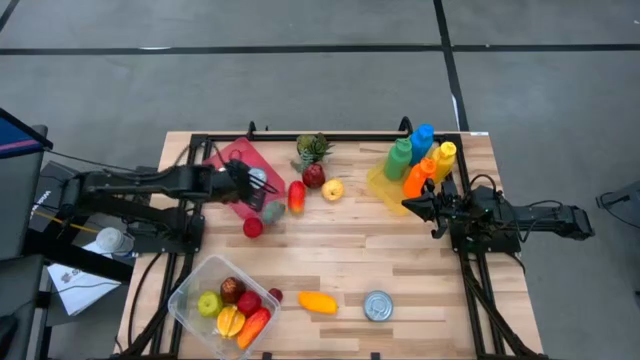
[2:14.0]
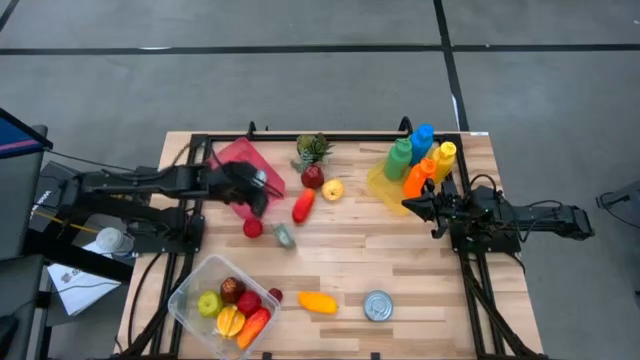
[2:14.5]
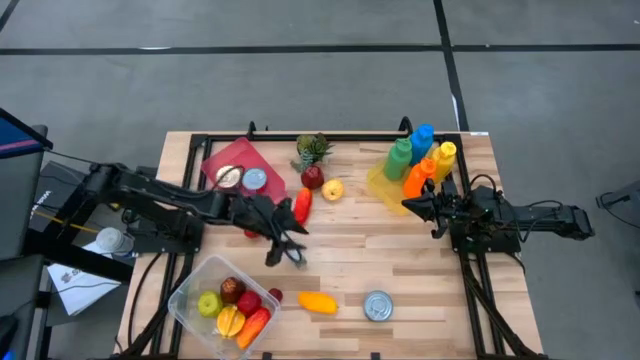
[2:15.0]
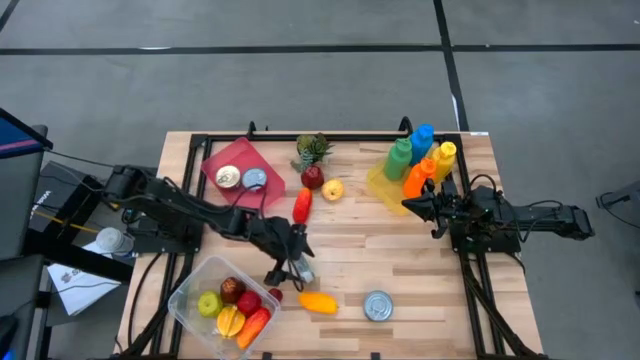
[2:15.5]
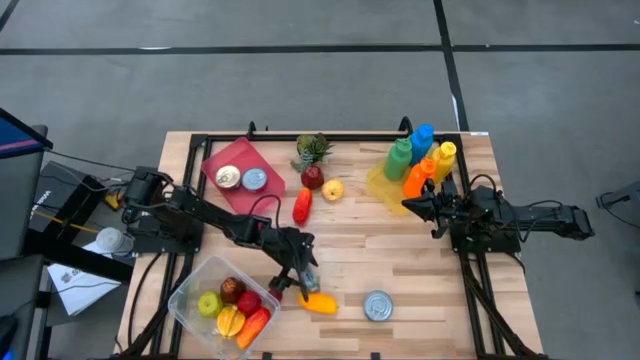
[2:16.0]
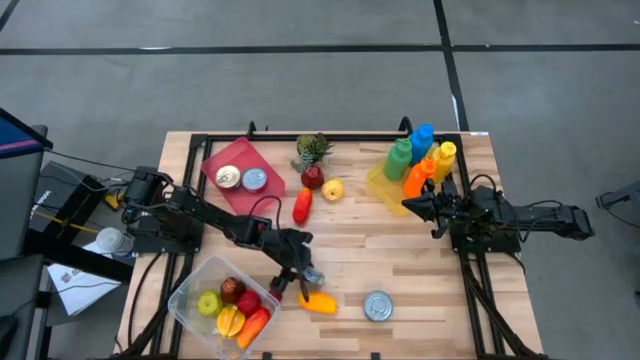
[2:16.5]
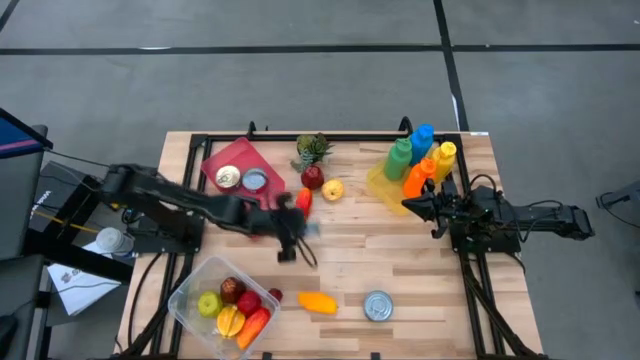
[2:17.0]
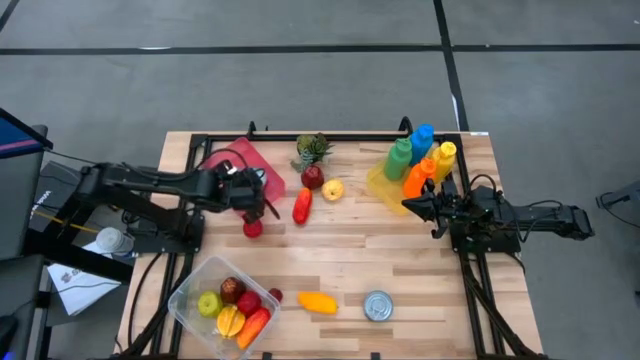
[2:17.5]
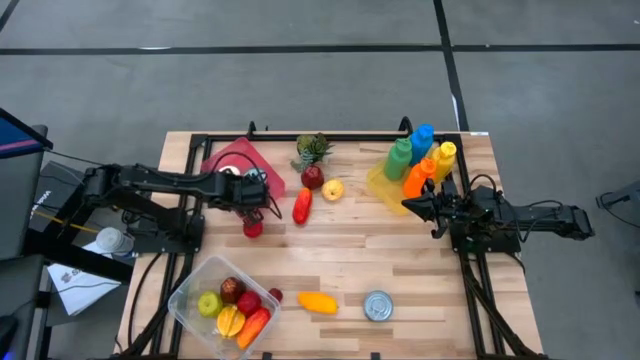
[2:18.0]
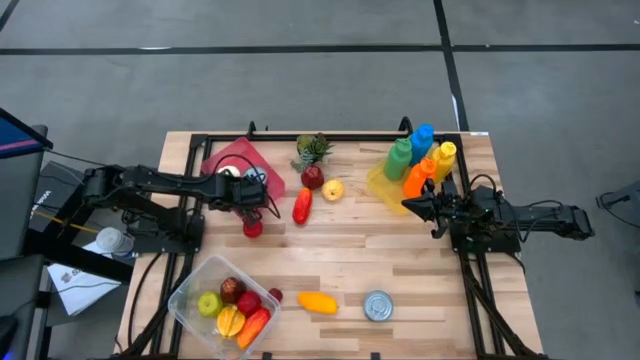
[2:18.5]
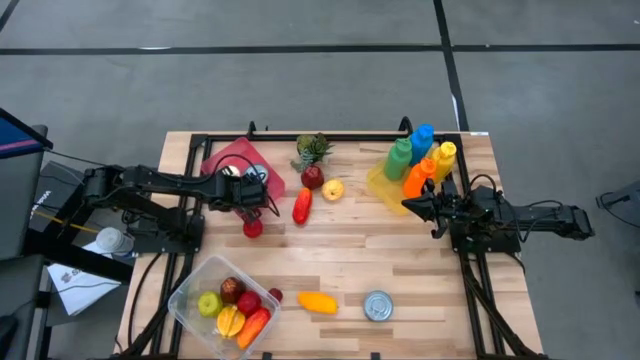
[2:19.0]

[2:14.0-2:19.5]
Task: Pick & Place Food Item
Put the green tuna can into the pink bin

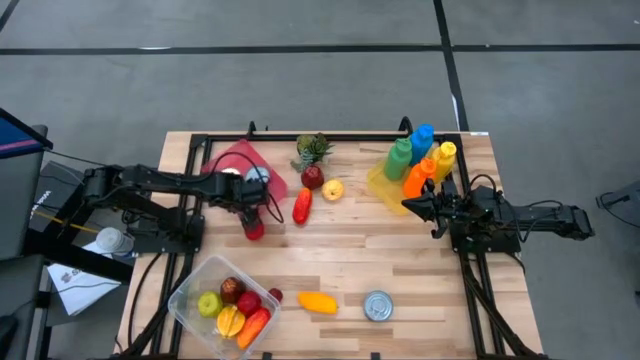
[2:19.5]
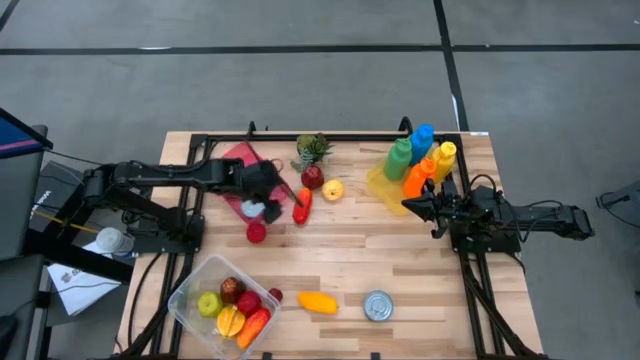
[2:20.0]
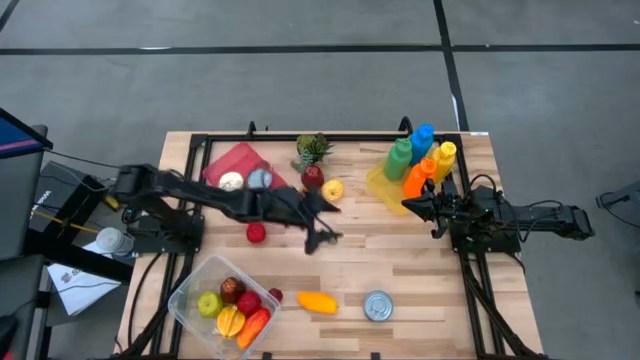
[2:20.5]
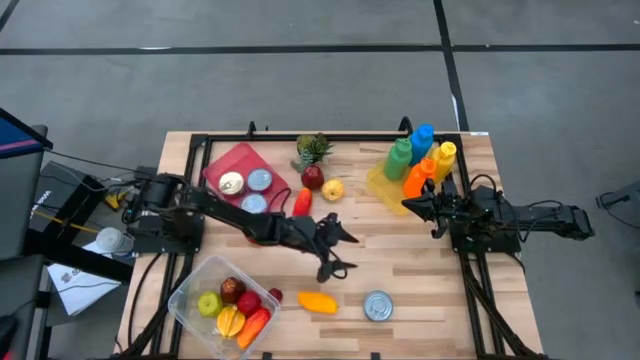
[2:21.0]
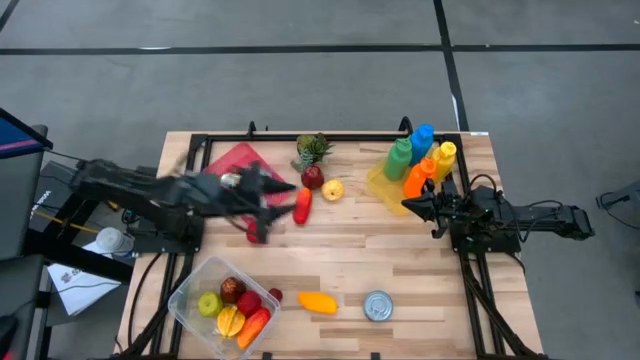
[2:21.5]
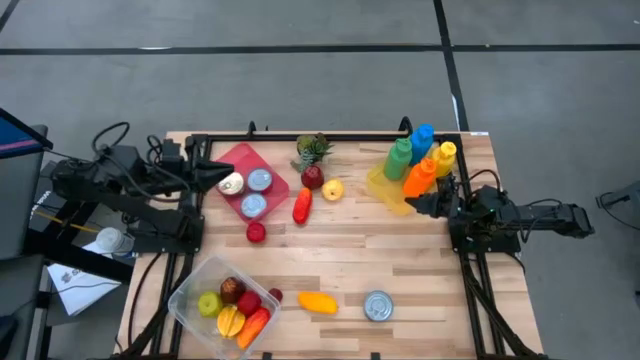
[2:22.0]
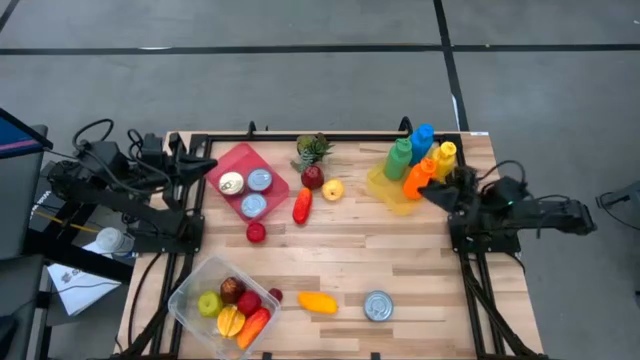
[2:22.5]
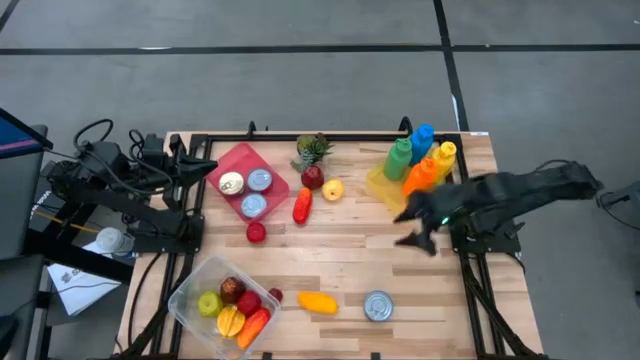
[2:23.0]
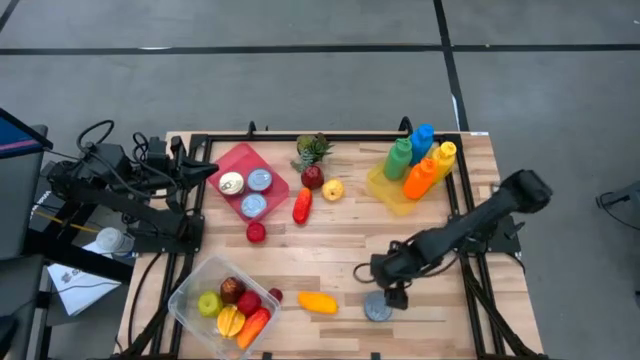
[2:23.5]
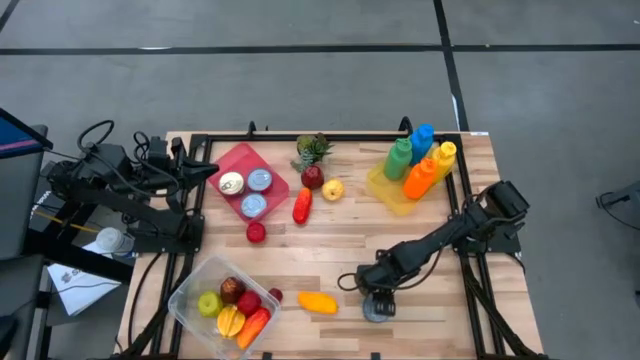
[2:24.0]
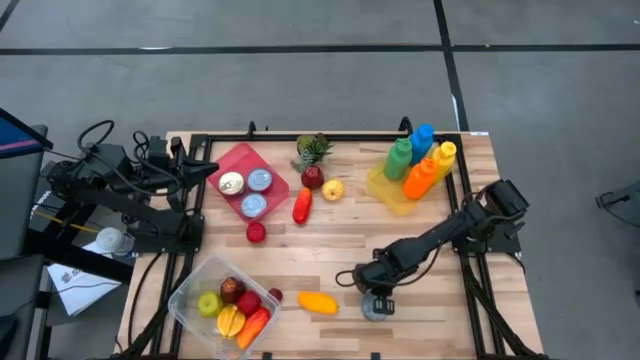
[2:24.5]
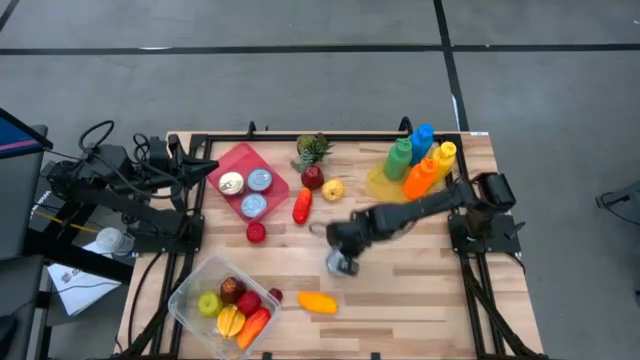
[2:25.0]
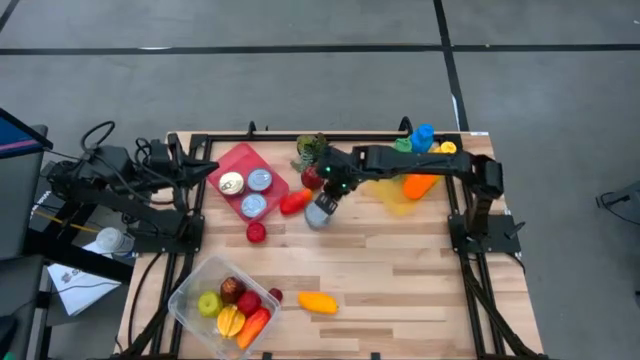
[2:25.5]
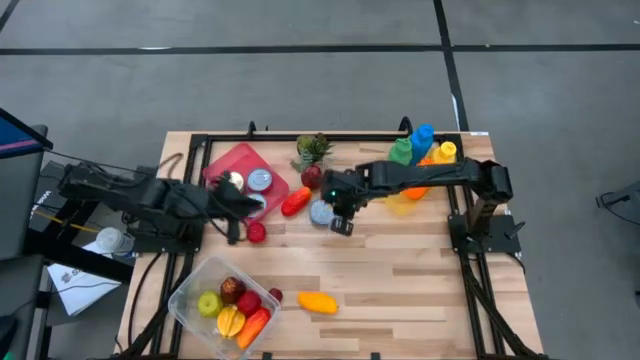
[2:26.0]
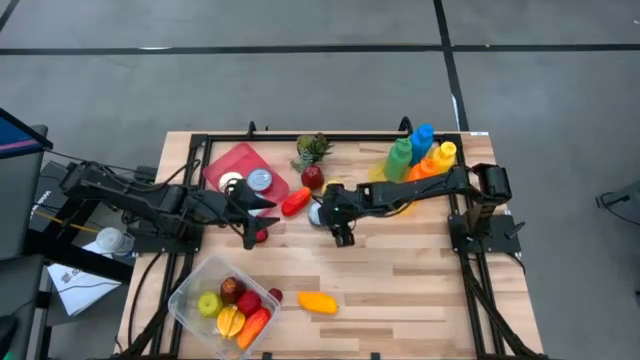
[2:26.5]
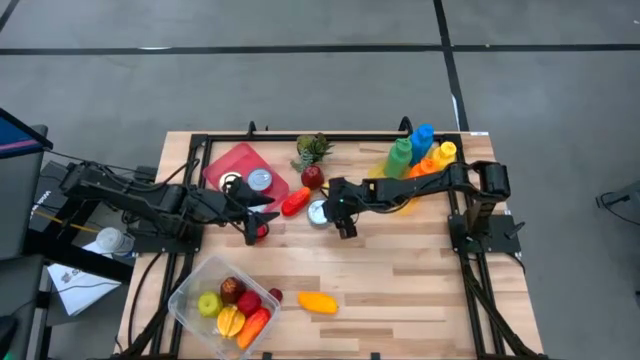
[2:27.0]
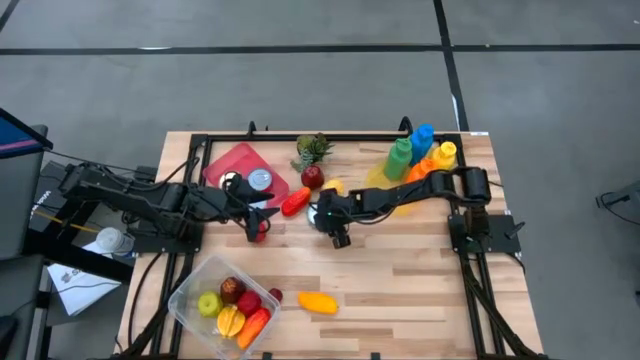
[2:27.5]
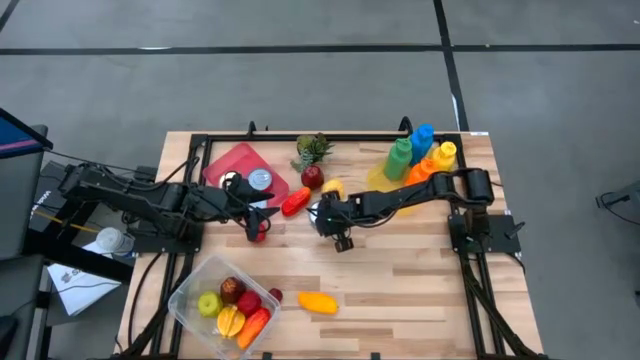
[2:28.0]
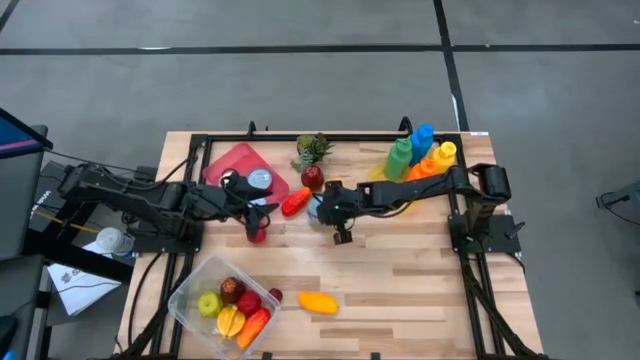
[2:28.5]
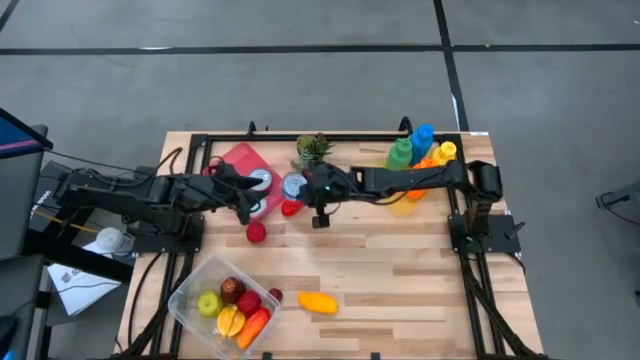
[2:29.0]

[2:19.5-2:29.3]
Put the blue tuna can into the pink bin

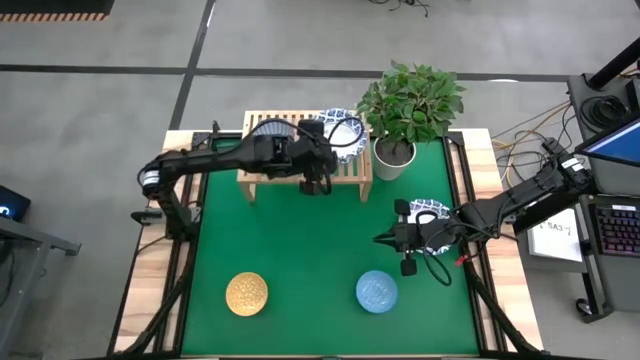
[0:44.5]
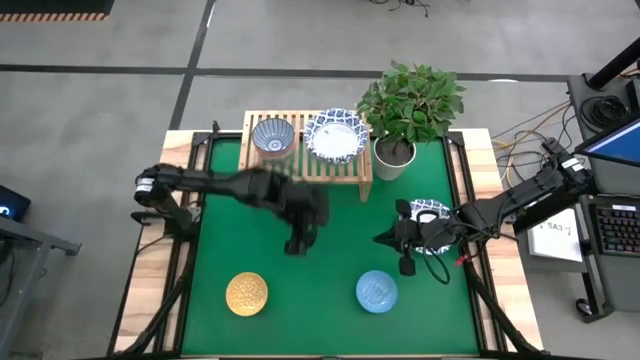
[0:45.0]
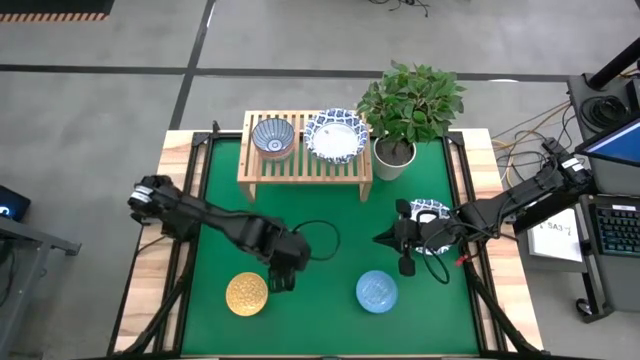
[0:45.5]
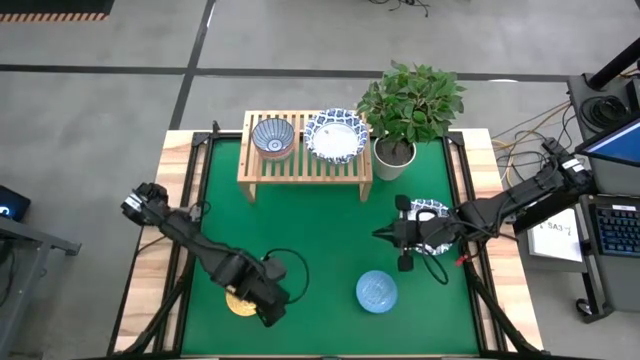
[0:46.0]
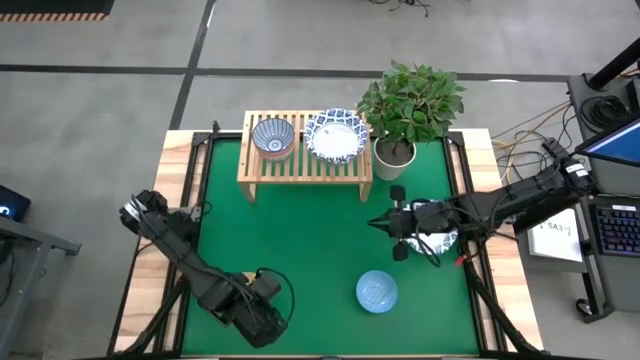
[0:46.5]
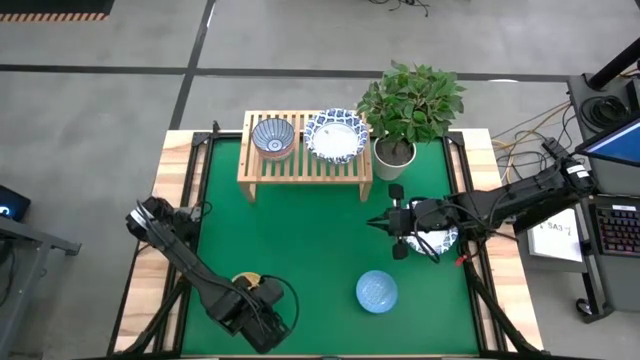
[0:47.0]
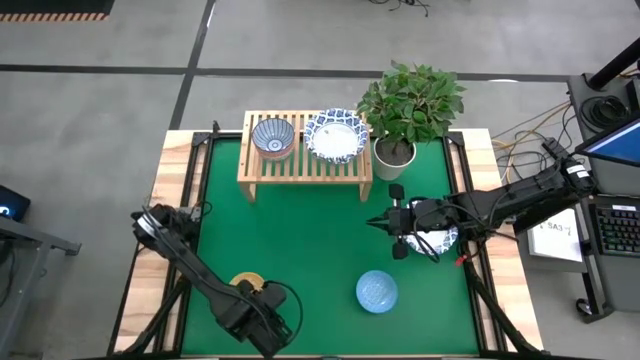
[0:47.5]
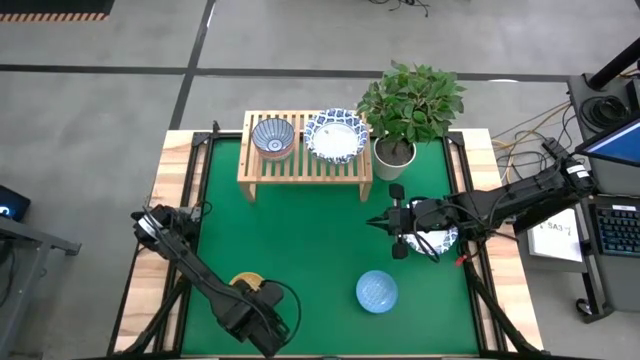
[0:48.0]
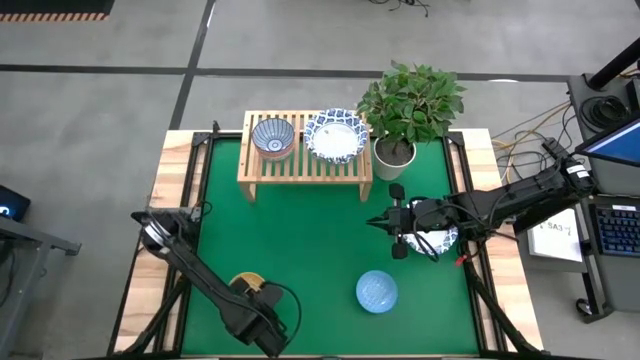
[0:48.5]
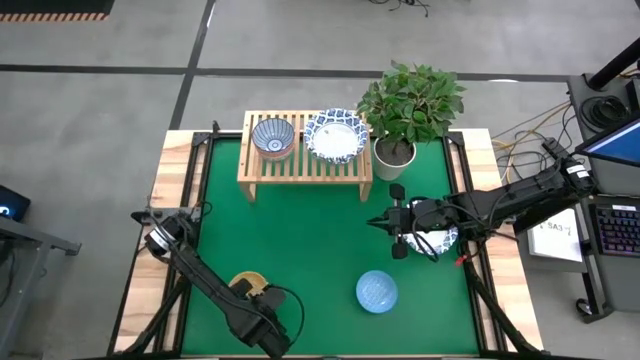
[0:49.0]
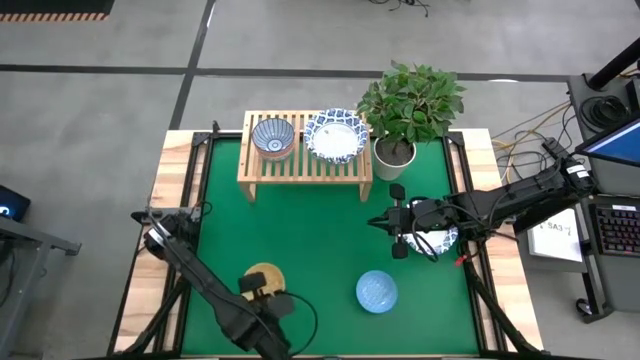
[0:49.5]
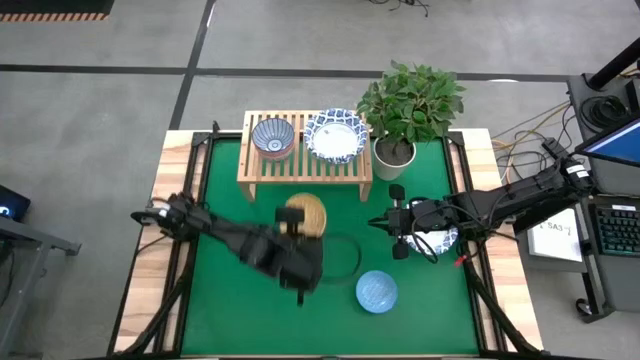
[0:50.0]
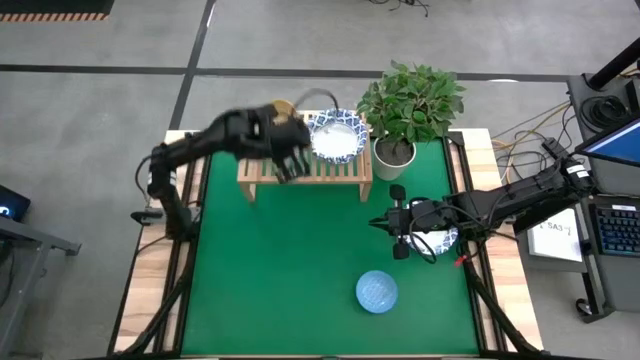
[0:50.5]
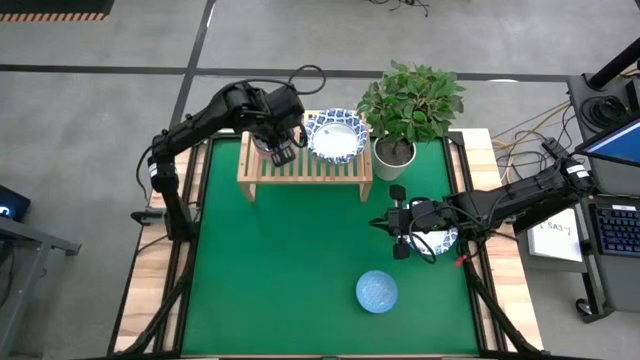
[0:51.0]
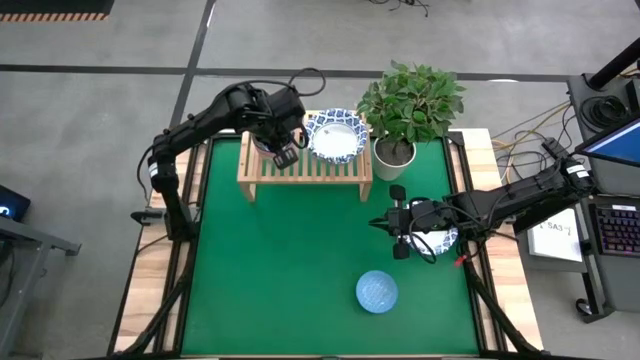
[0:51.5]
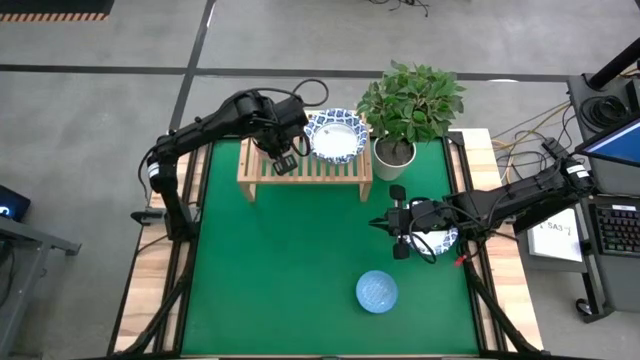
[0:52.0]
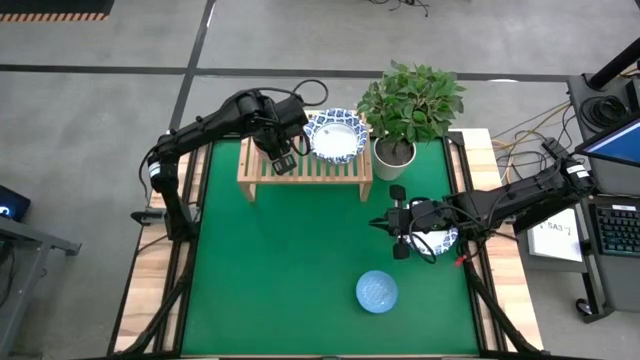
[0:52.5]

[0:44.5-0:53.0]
Task: Place and stack plates onto a shelf
Stack the yellow bowl on top of the blue and white bowl on the shelf
